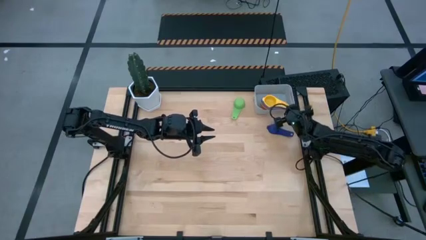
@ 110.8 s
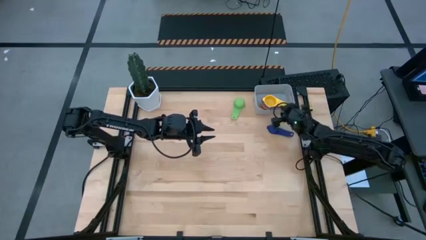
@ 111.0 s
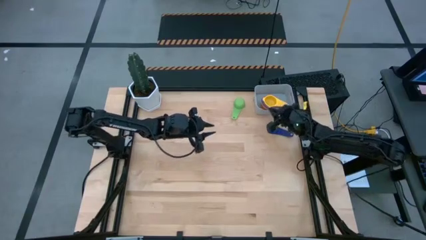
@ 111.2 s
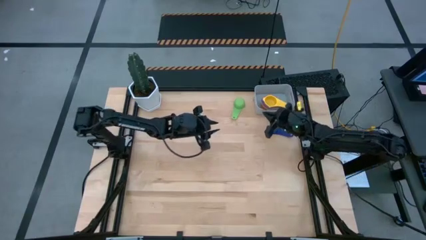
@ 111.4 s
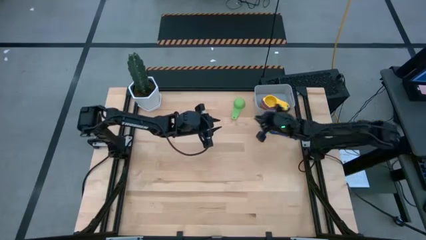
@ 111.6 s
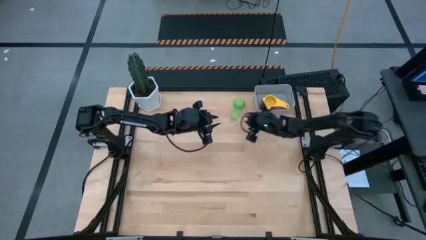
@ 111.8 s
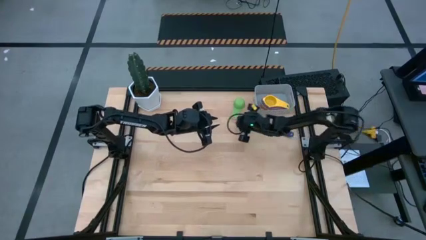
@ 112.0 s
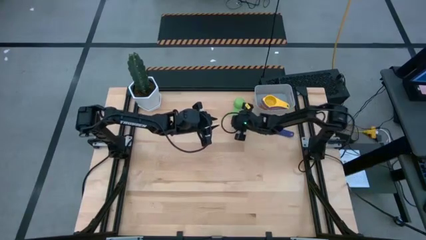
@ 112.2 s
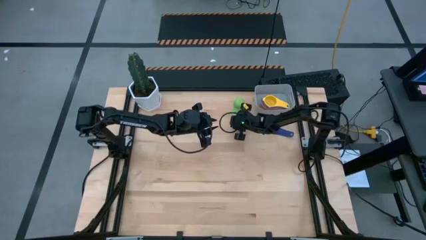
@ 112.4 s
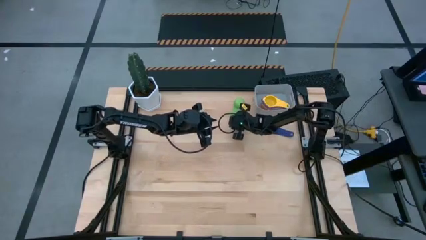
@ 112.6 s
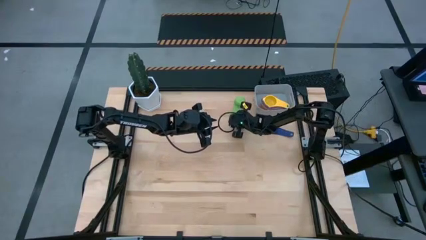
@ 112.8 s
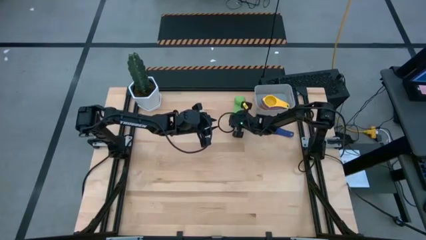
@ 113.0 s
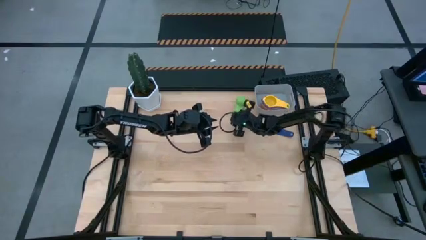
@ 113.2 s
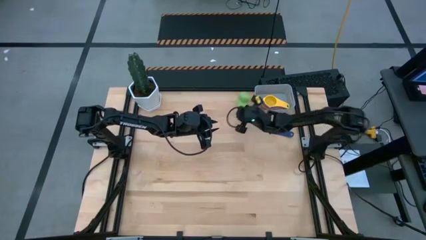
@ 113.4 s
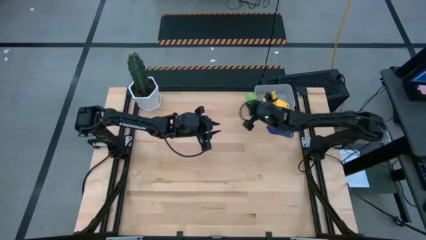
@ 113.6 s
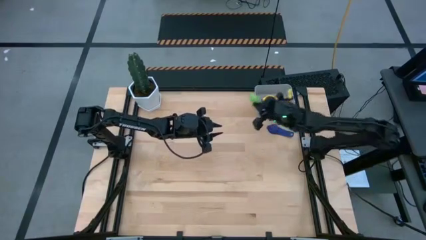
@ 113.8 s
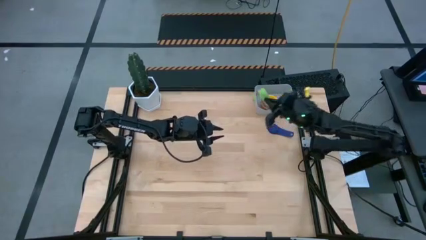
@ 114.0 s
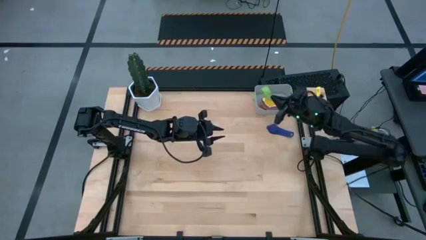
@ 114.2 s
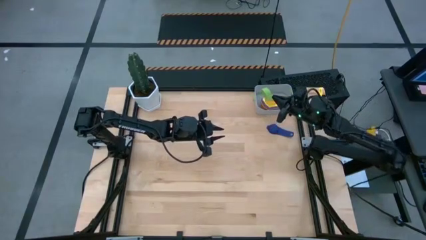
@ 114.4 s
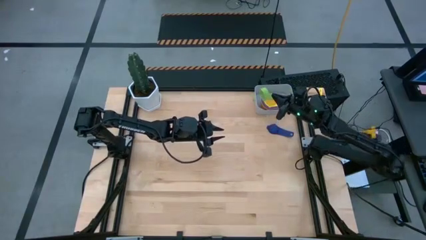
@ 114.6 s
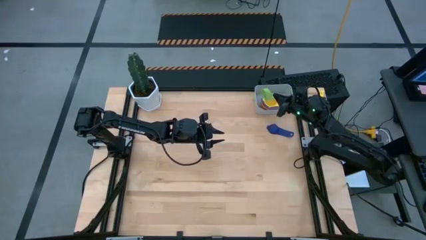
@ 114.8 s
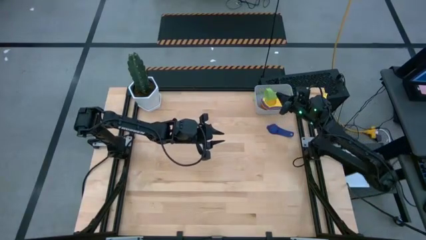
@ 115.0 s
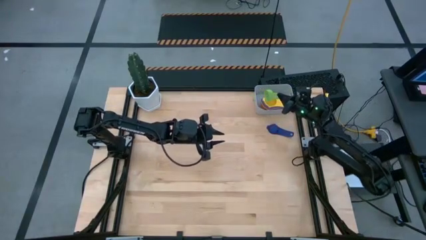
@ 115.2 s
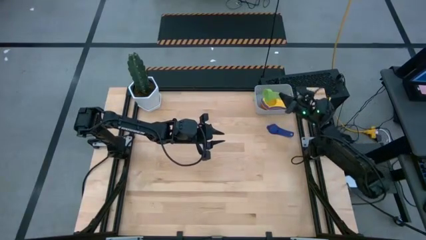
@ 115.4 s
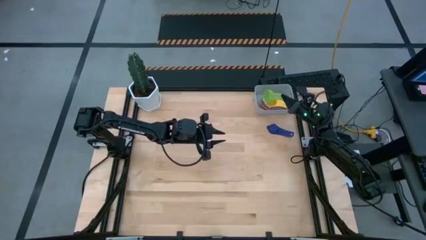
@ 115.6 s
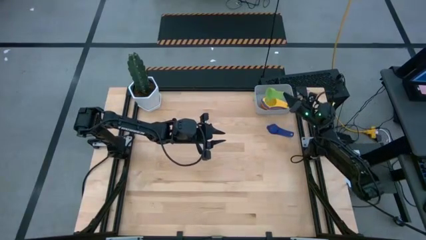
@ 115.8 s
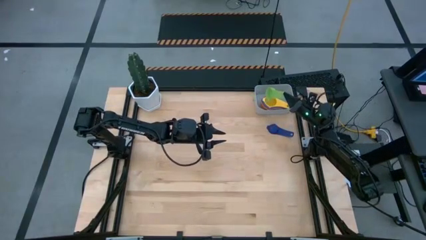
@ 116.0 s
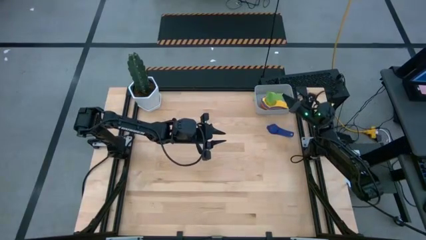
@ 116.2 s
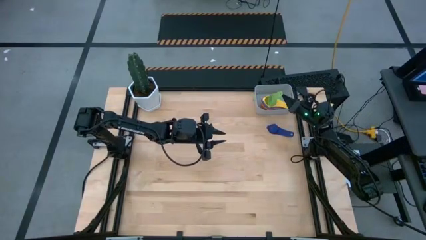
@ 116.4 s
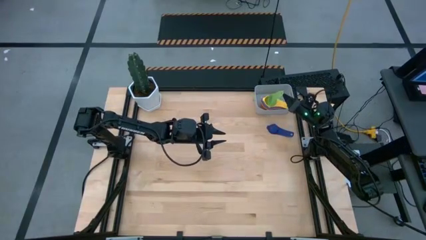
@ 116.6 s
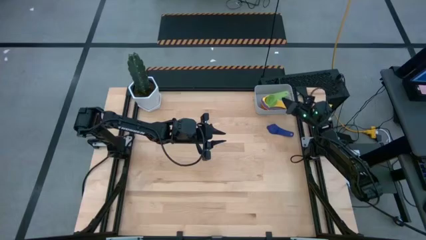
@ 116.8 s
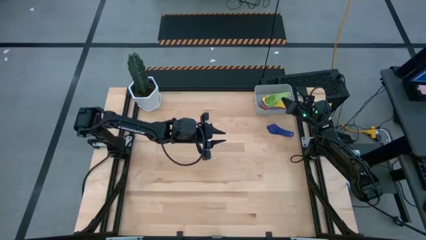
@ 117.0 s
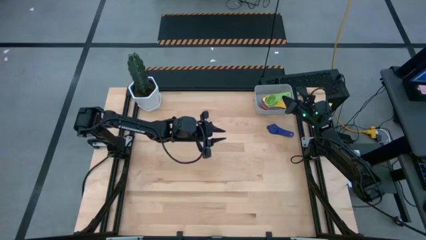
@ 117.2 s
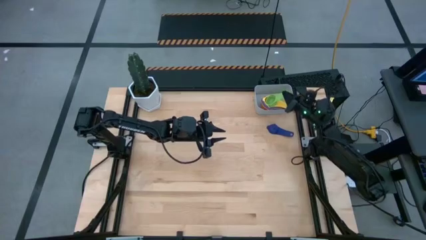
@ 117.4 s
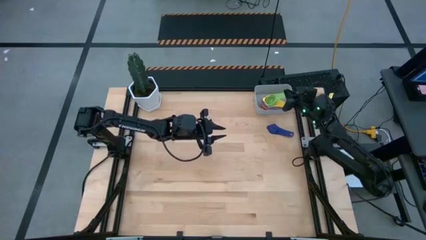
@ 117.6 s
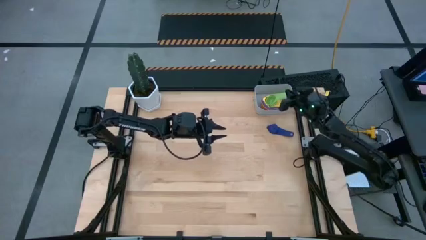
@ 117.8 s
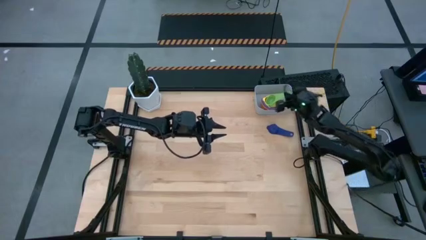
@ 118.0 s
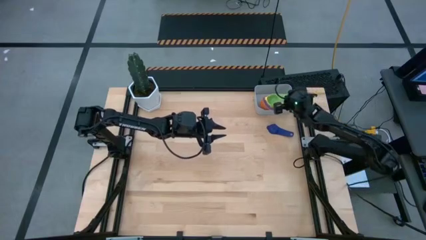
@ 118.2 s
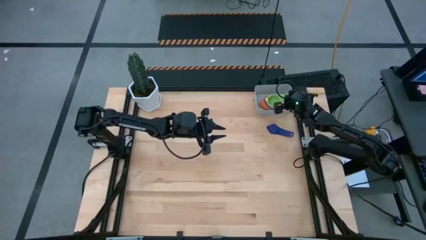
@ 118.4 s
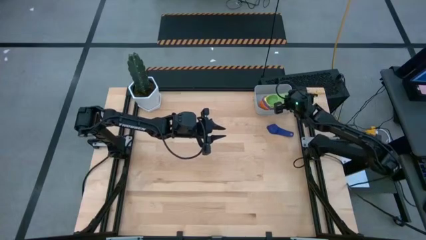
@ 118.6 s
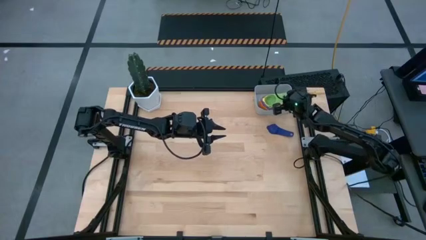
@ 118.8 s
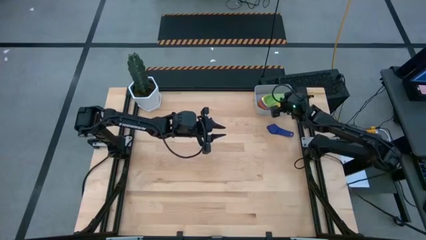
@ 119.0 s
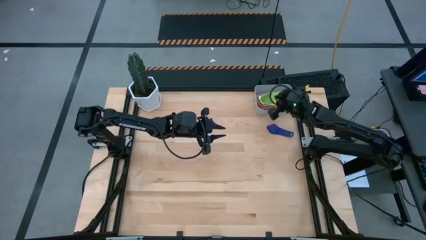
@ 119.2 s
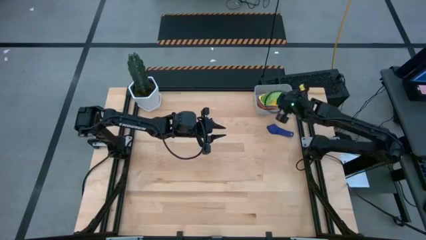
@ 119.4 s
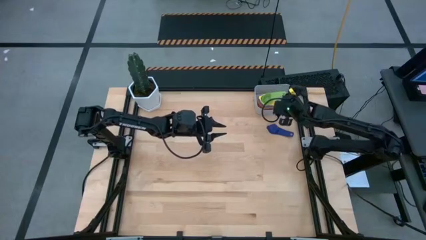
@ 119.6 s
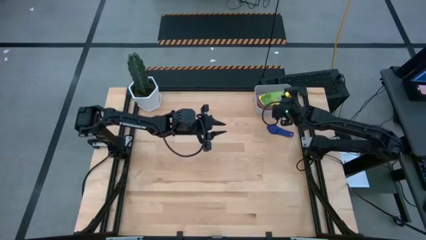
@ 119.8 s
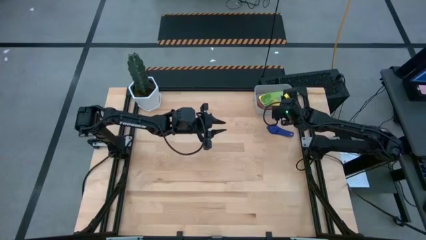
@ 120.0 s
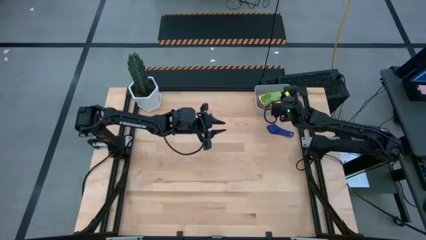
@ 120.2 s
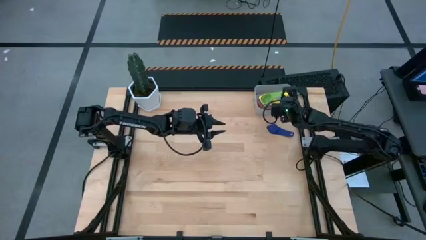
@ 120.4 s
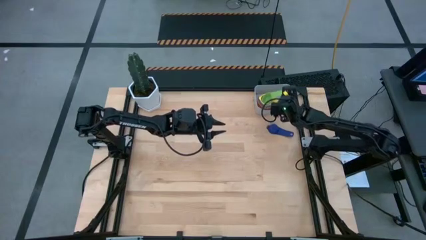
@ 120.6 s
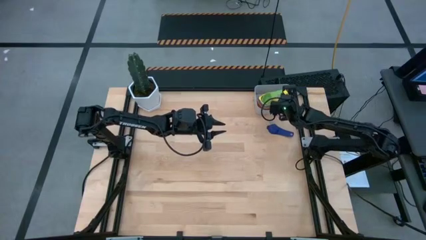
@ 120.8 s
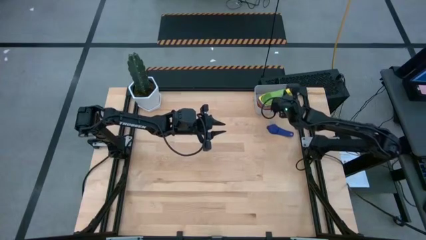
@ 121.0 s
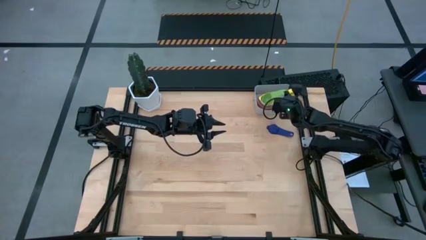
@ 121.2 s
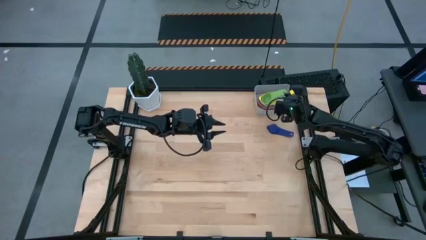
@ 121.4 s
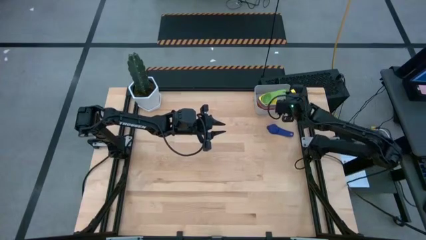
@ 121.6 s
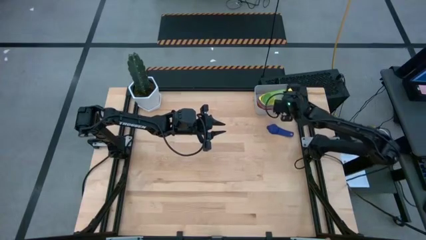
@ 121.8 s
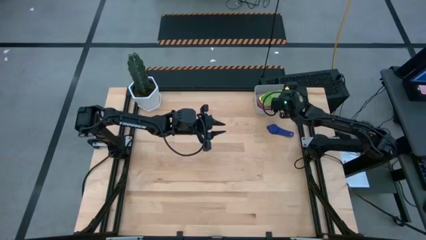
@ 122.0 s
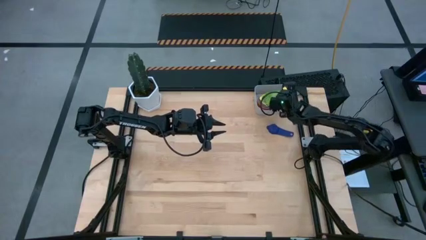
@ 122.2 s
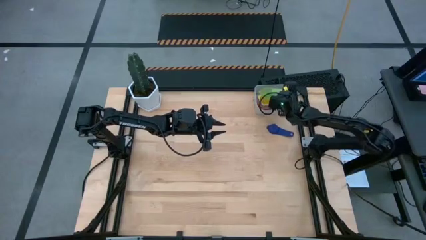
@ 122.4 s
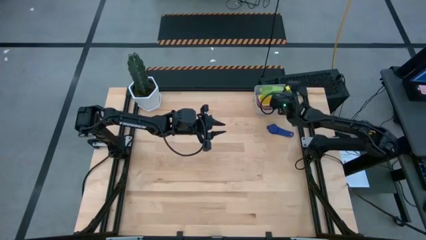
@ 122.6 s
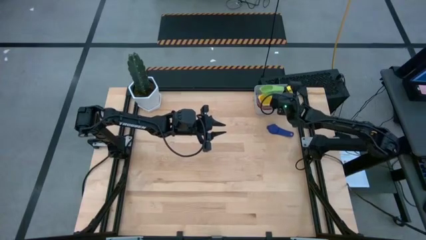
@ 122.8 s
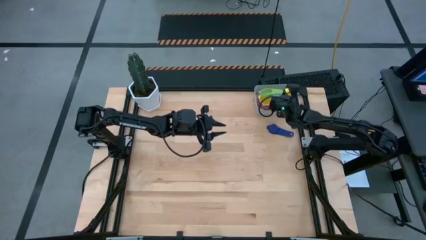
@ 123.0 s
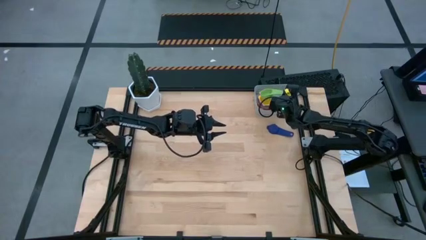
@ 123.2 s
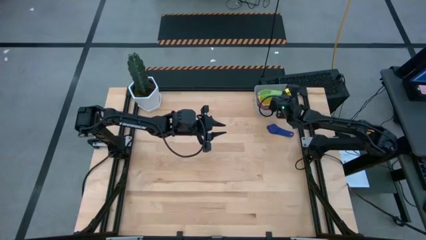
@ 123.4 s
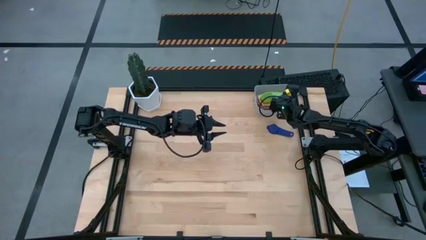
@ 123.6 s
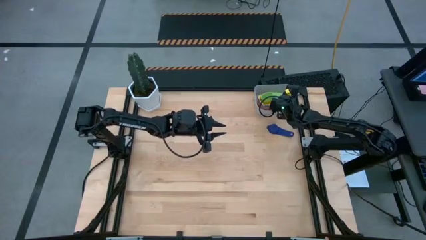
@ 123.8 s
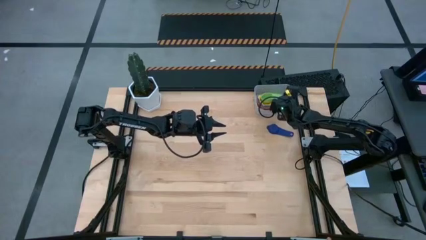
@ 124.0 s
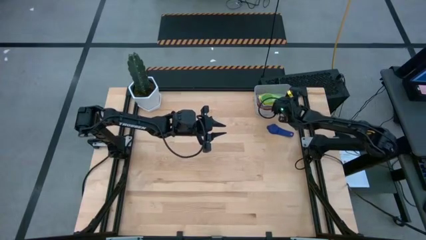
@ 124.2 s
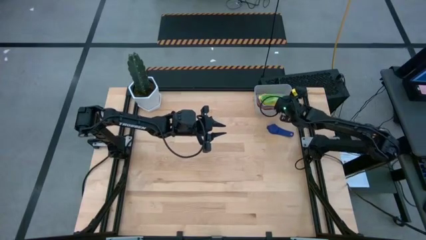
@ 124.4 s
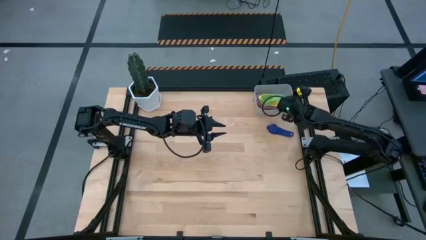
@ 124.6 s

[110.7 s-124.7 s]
Task: Nest measuring cups in basket
Stack the green measuring cup on top of the yellow measuring cup into the gray bin

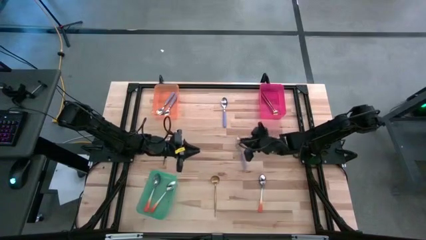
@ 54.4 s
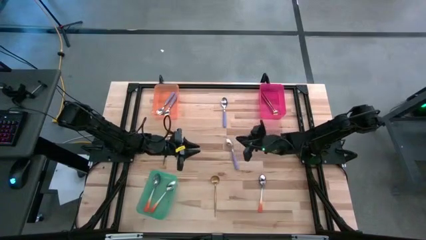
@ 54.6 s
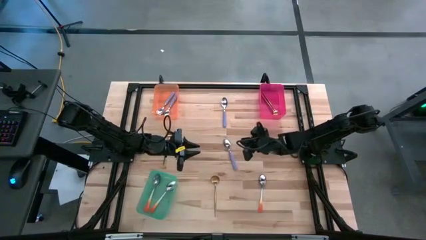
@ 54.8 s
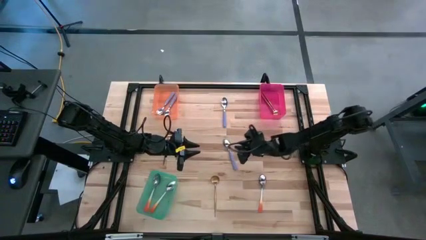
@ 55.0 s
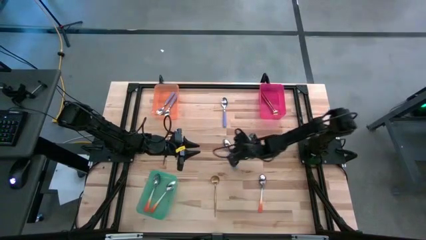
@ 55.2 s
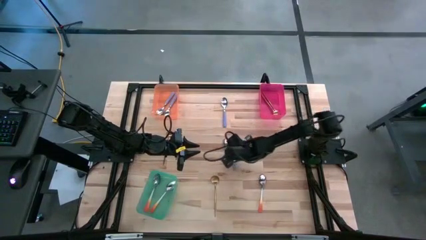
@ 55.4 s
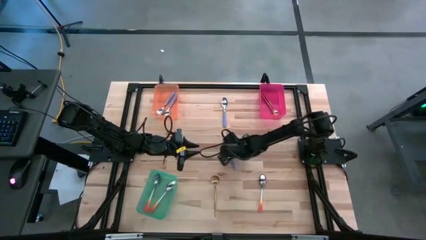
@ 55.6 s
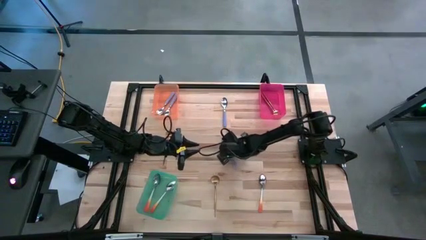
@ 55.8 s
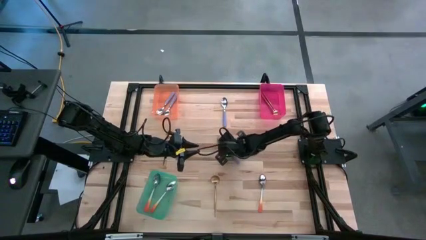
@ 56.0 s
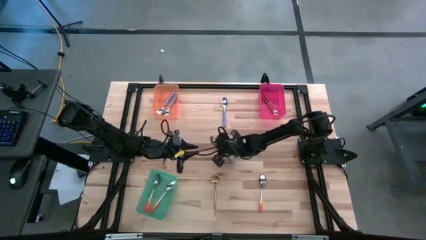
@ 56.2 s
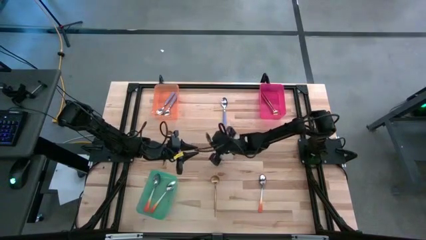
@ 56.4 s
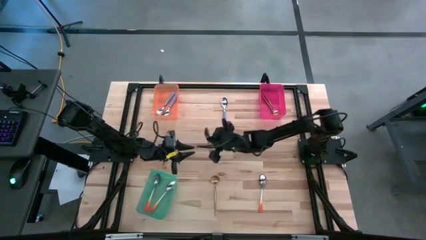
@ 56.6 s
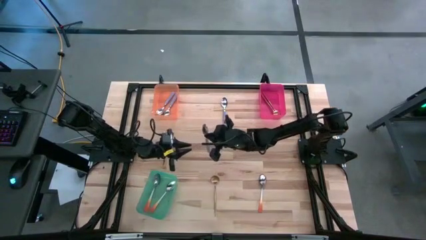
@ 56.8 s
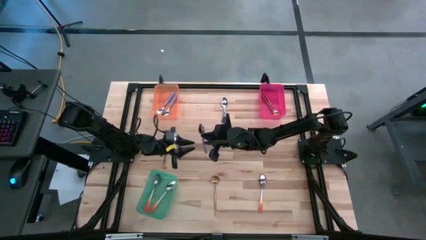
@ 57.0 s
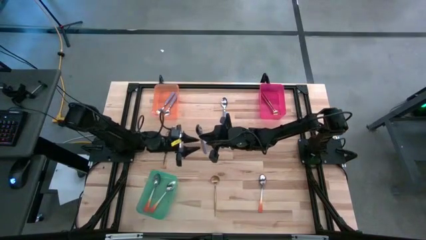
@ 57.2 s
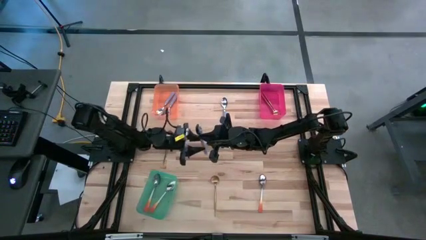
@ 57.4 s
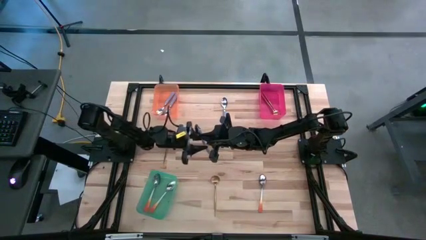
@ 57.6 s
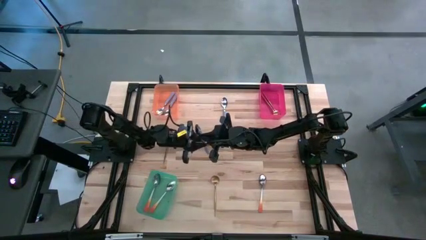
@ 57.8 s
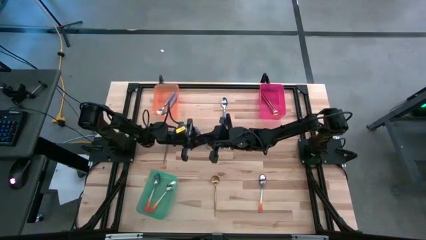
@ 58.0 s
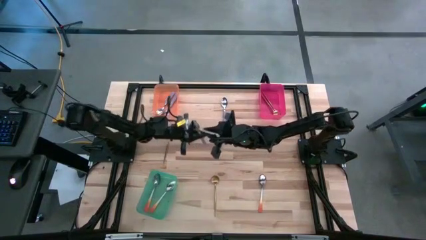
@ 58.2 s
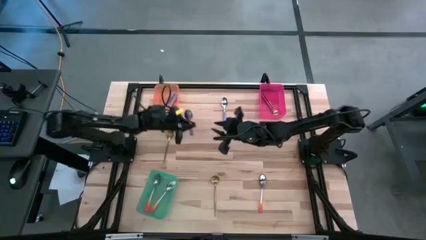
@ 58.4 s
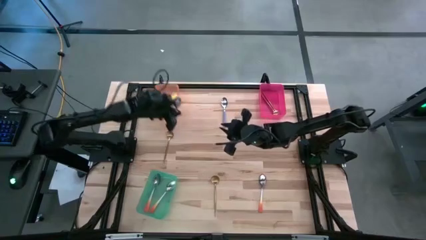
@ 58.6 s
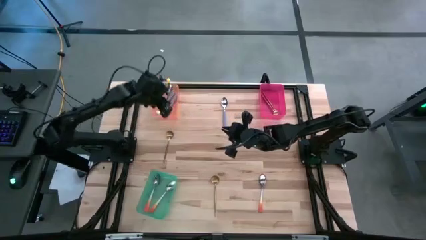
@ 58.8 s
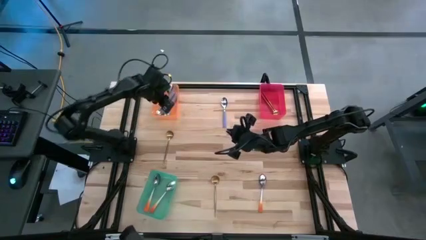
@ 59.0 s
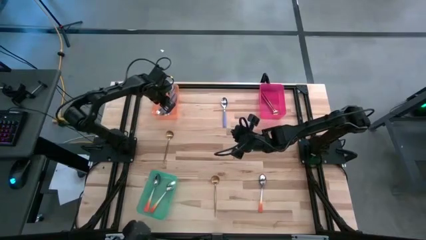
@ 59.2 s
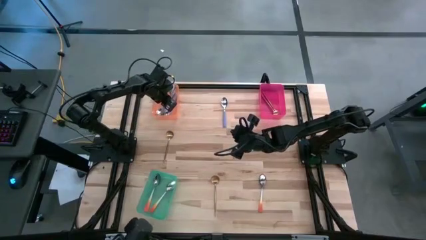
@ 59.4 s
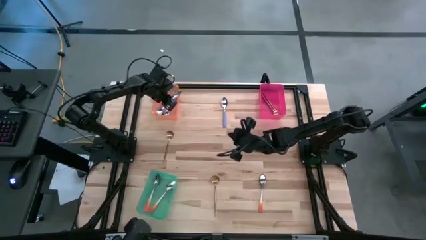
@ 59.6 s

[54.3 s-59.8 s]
Task: Sort silverware by color (type)
Put the purple spoon into the orange bin
